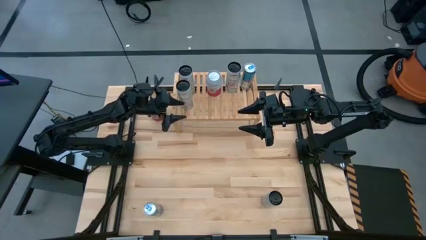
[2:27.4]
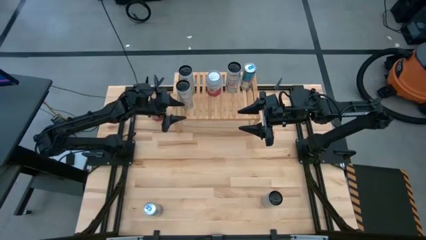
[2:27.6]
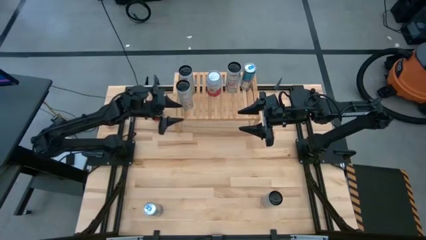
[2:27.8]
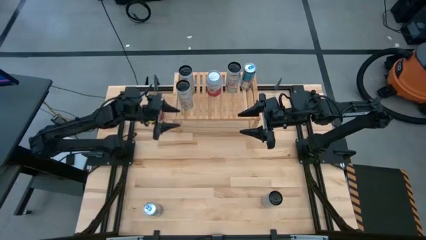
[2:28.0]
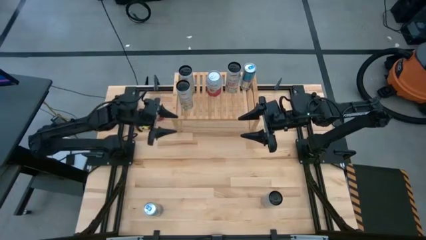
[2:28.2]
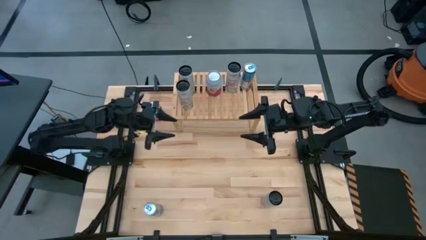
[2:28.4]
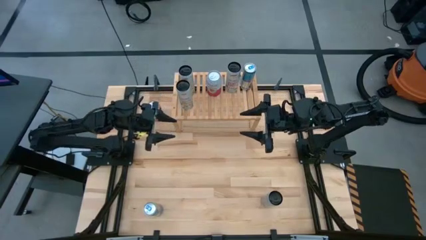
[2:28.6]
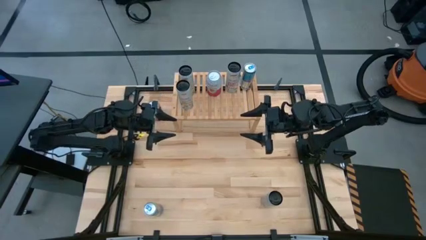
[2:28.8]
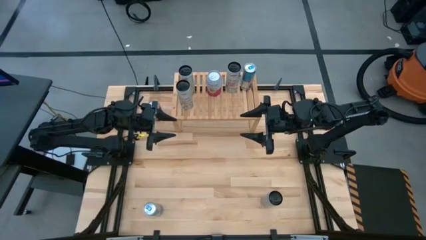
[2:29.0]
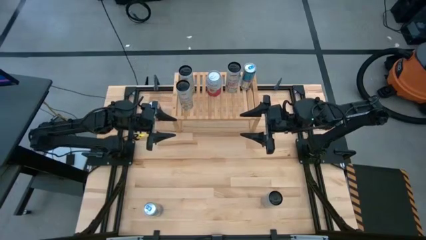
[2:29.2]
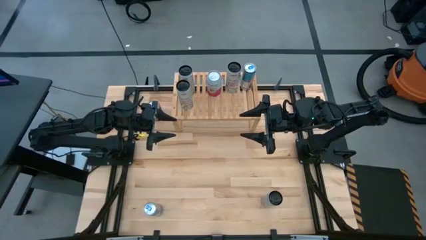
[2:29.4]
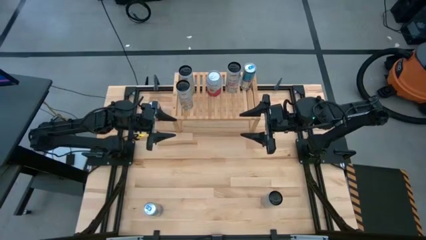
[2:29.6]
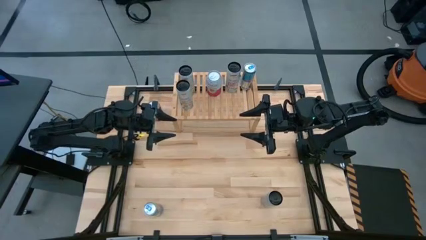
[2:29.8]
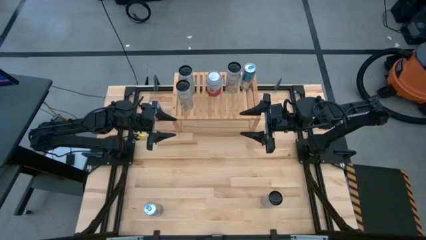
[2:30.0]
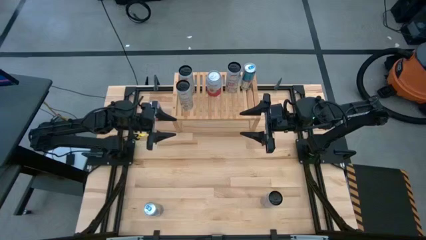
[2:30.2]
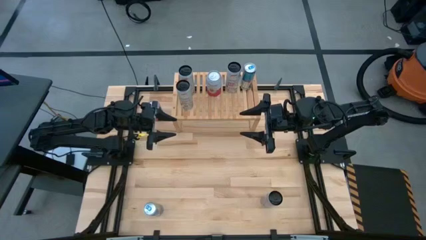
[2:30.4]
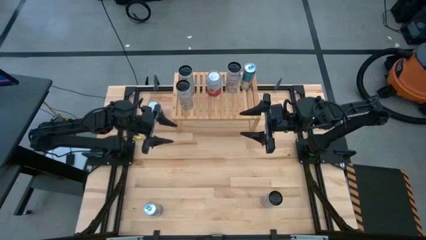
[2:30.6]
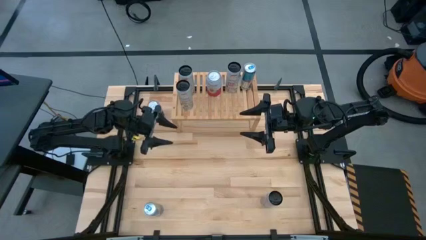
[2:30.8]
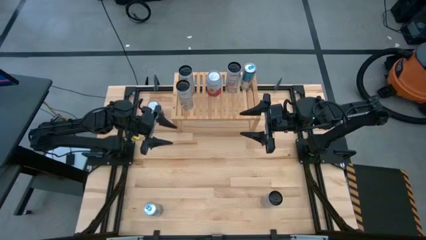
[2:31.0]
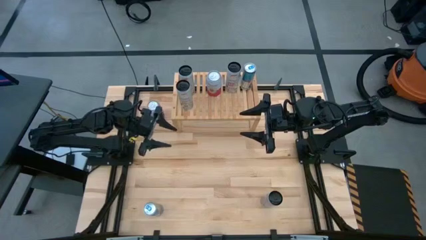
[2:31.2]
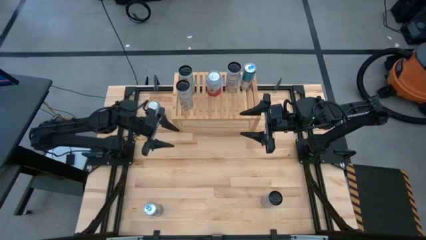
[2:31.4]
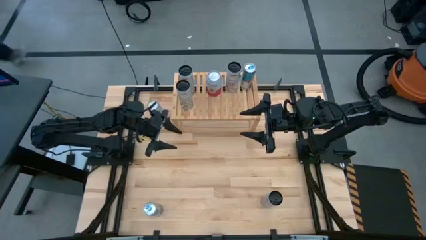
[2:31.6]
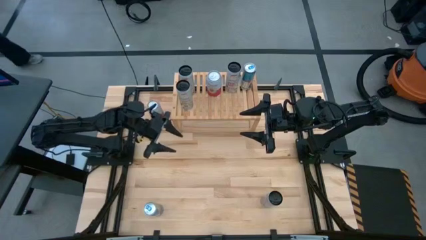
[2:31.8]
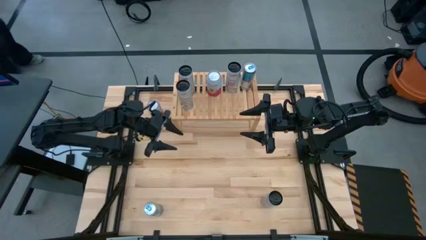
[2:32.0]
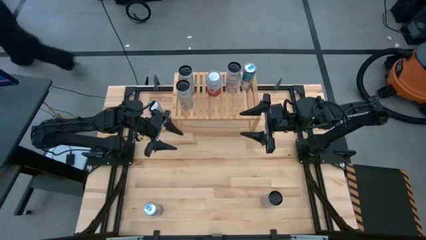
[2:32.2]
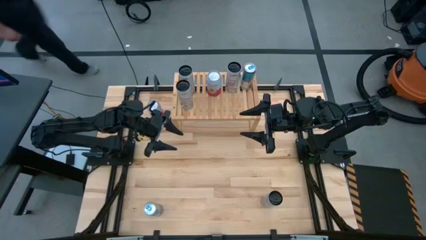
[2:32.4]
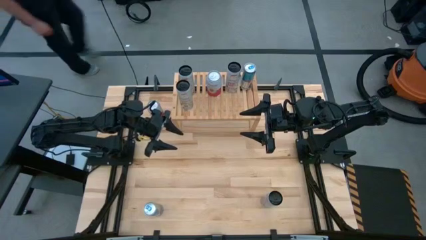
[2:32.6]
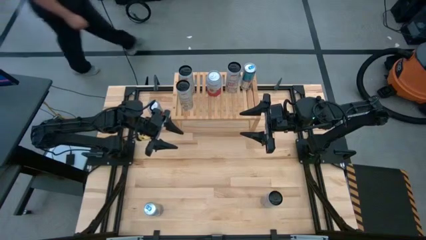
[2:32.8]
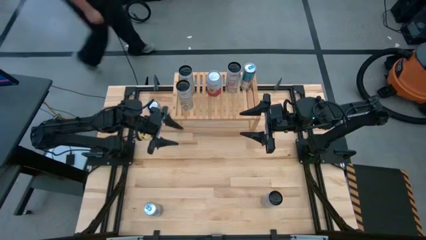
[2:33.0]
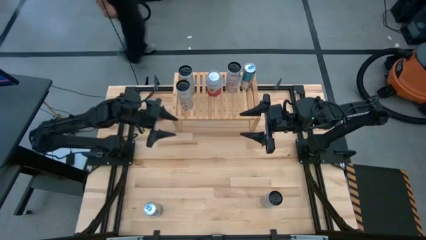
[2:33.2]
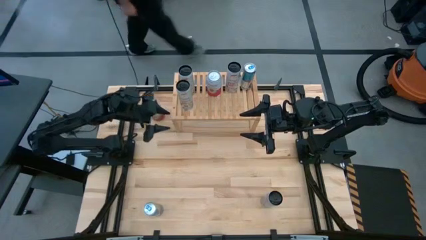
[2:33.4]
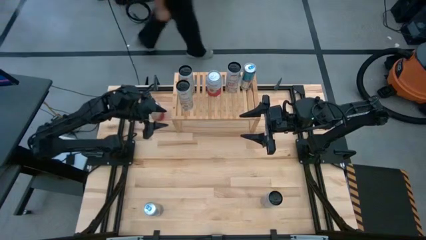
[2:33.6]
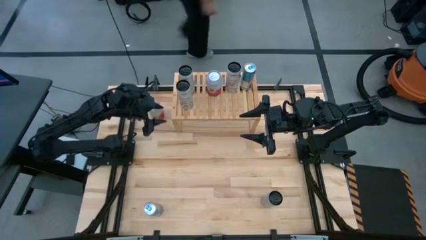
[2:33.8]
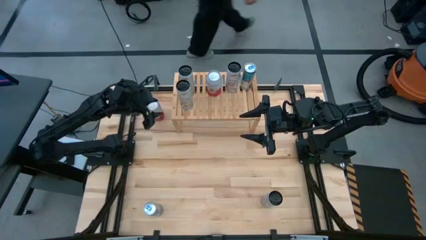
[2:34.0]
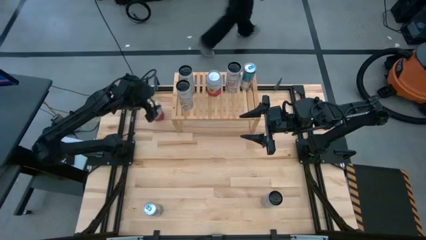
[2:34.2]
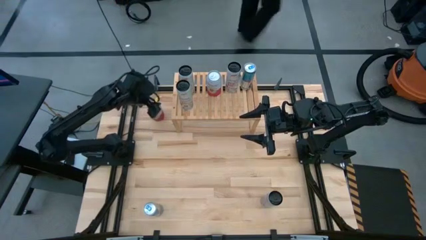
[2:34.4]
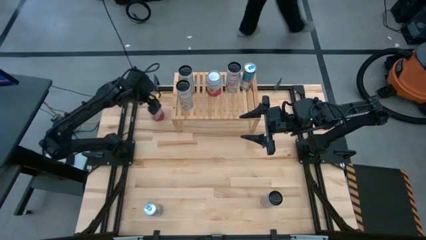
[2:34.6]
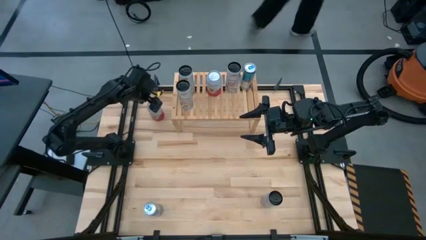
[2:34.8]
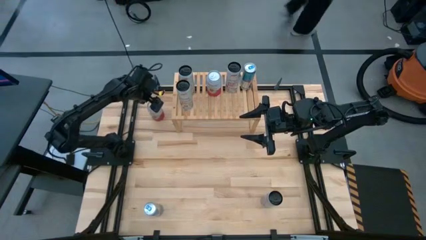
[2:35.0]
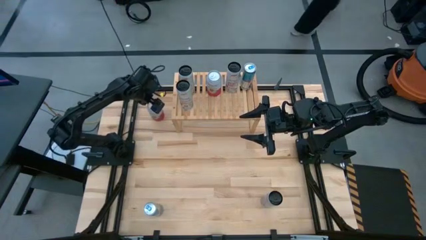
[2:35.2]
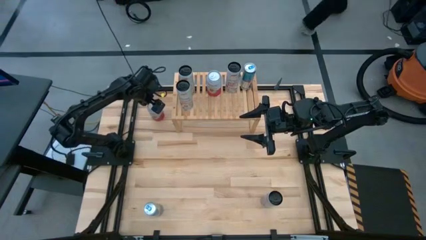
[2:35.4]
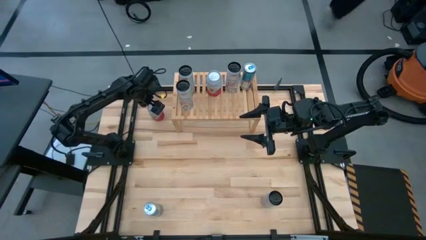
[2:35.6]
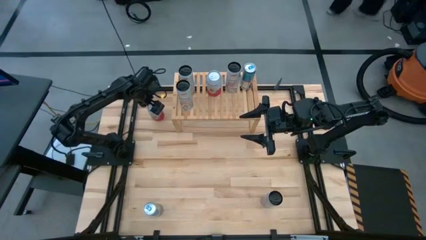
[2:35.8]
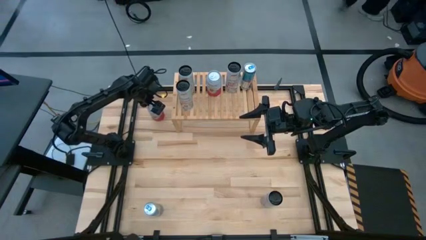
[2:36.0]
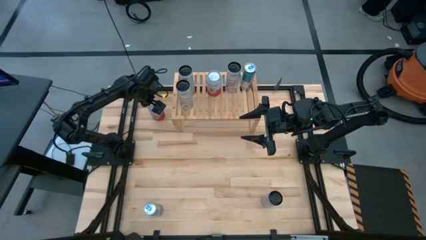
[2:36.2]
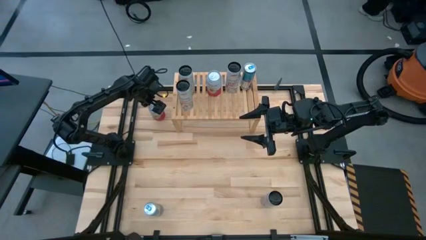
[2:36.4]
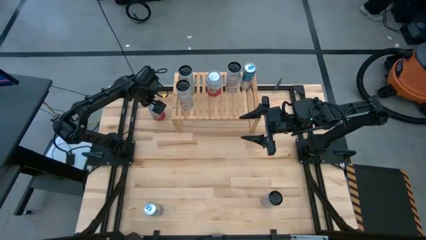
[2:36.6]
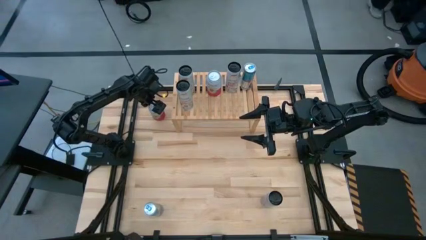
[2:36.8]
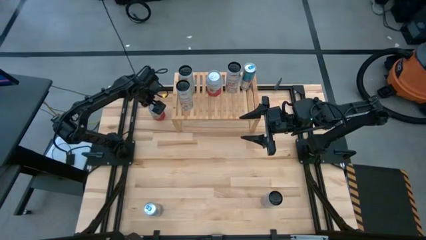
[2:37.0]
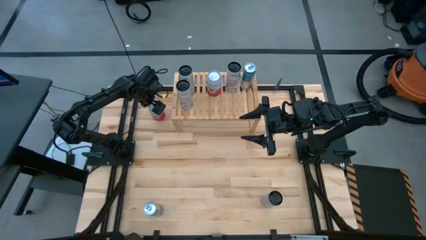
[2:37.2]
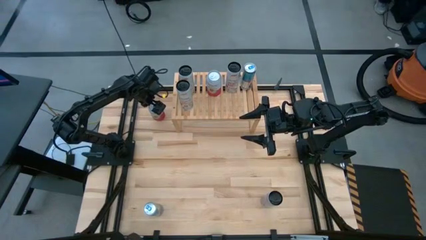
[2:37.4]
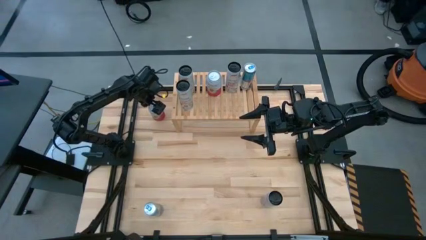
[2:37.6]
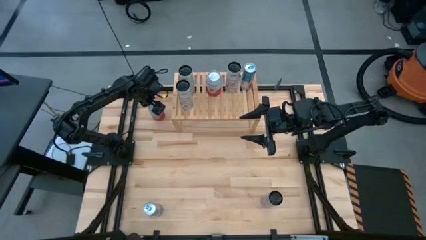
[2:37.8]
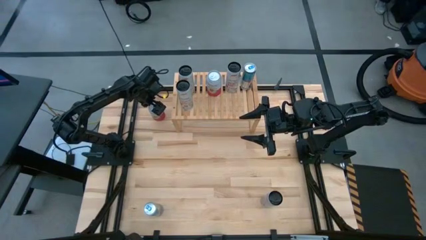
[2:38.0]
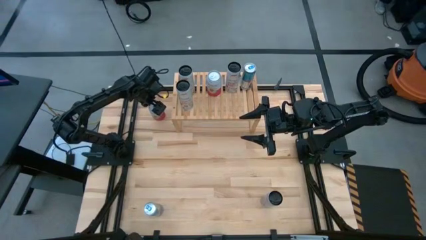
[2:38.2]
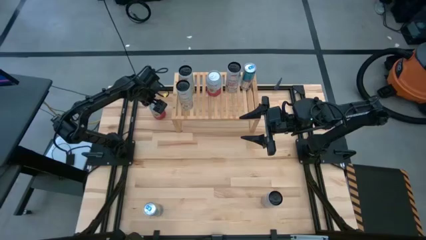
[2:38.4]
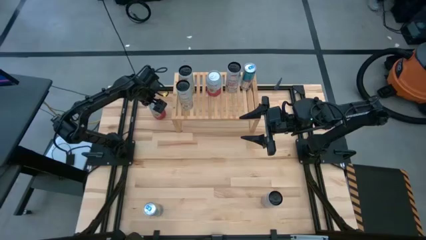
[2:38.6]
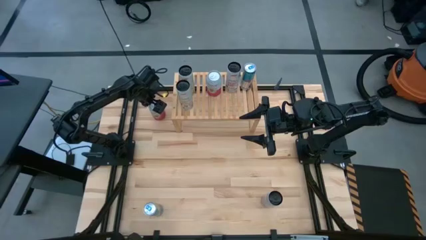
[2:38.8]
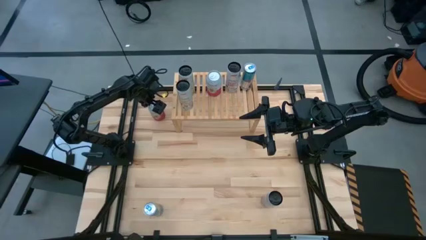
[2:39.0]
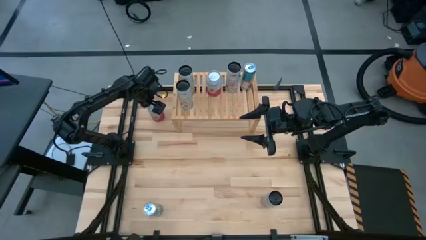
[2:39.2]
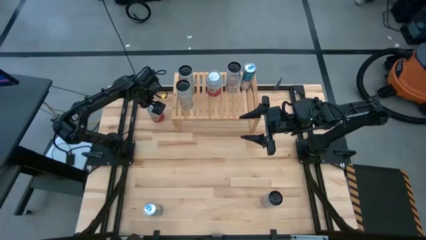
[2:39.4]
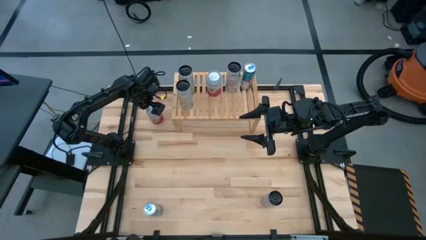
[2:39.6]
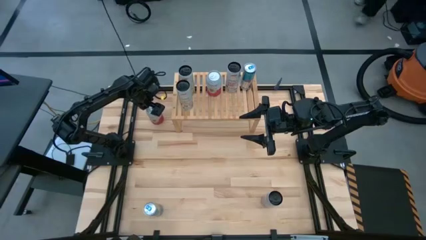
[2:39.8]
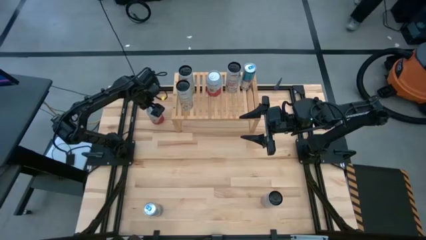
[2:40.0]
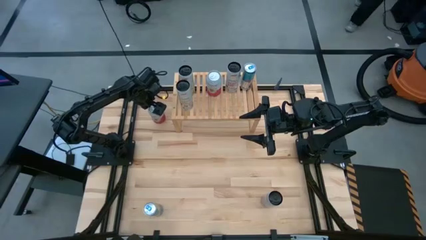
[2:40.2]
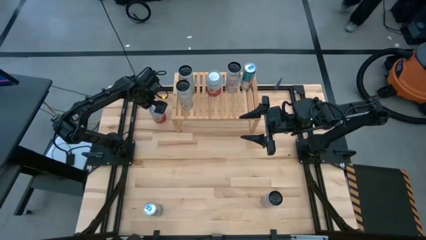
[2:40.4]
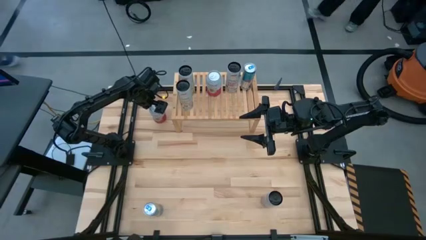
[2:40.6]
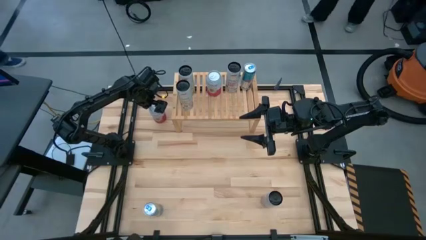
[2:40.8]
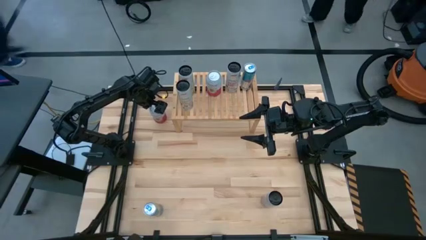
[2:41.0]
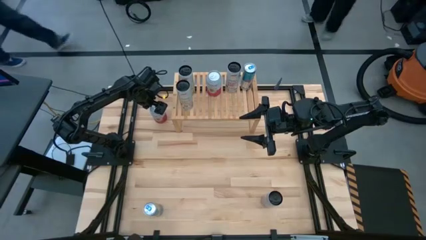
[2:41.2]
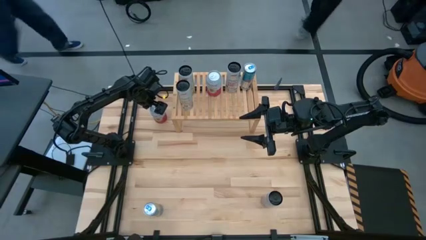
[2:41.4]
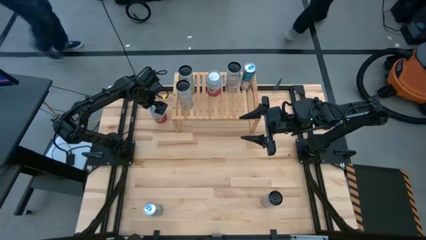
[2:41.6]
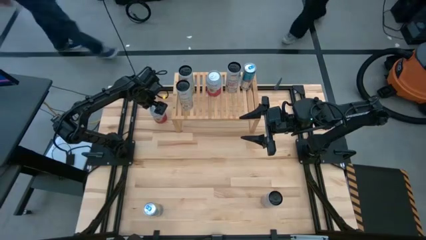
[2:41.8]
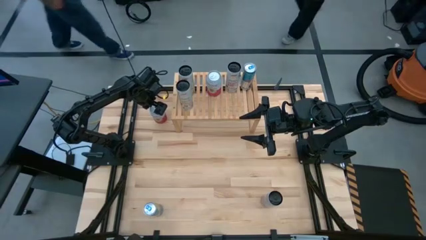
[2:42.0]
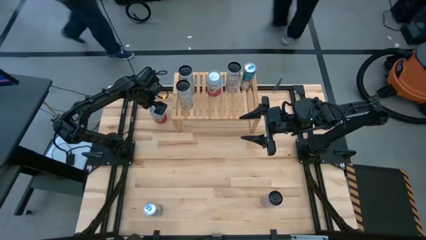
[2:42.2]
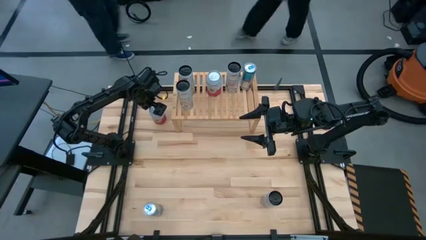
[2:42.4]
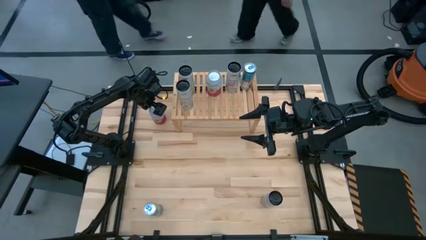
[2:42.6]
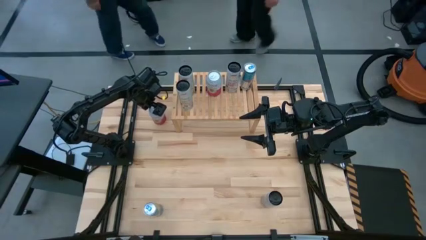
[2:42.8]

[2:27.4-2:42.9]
Task: Place canned beverage on shelf
Put the pink white soda can on the shelf aligned with the other pink white soda can
